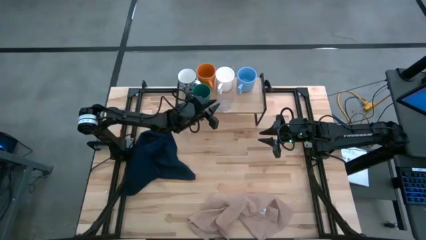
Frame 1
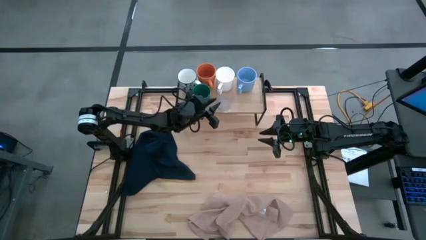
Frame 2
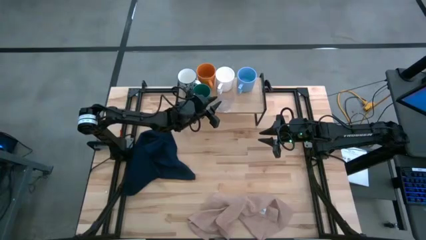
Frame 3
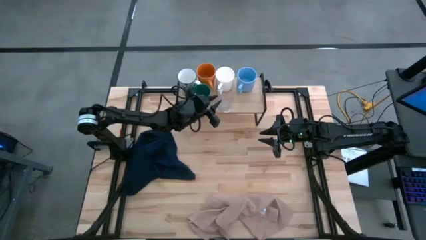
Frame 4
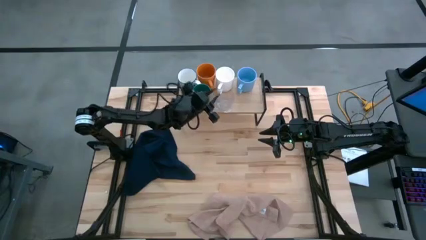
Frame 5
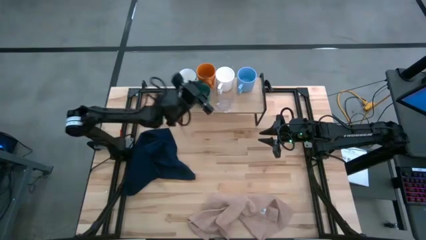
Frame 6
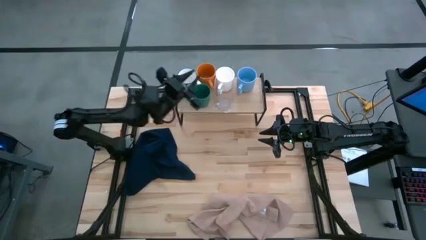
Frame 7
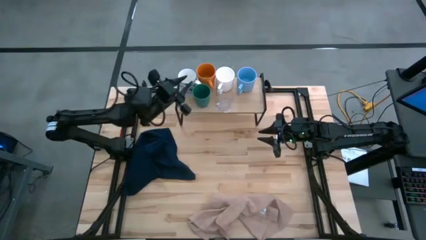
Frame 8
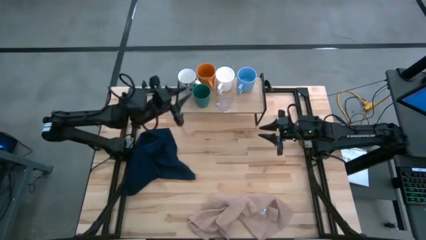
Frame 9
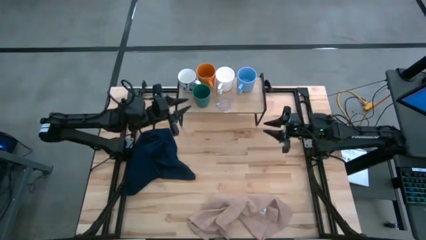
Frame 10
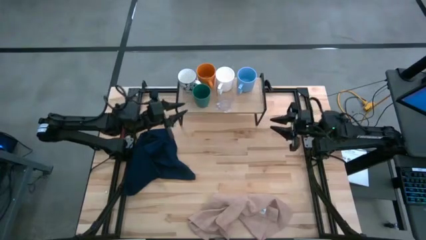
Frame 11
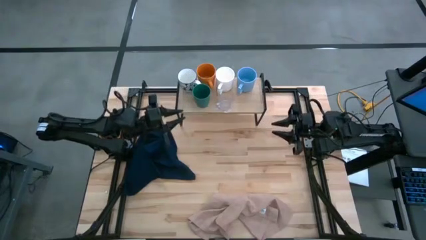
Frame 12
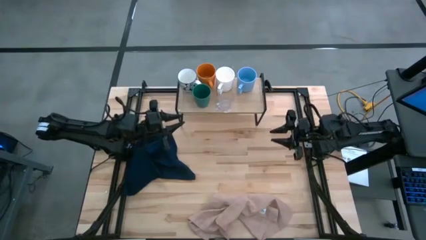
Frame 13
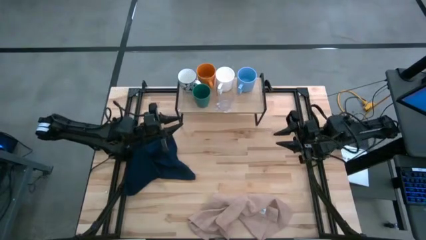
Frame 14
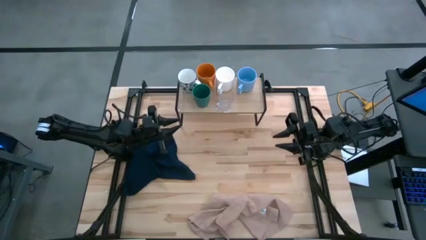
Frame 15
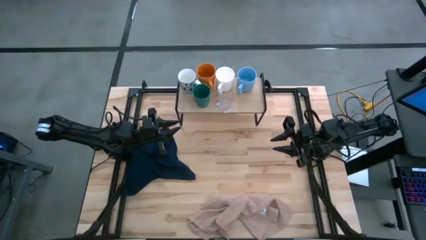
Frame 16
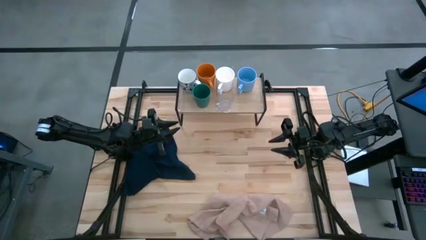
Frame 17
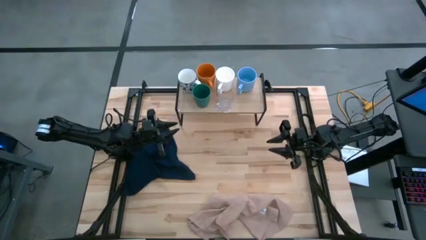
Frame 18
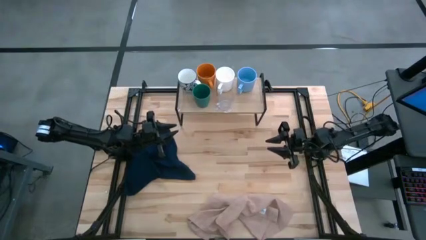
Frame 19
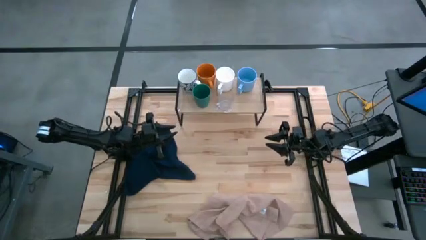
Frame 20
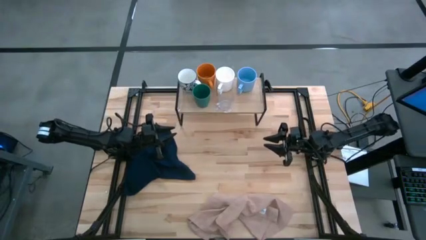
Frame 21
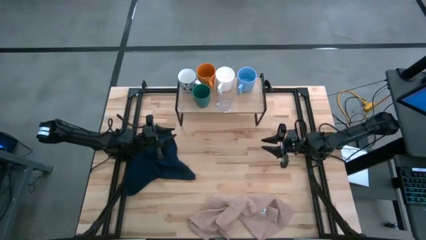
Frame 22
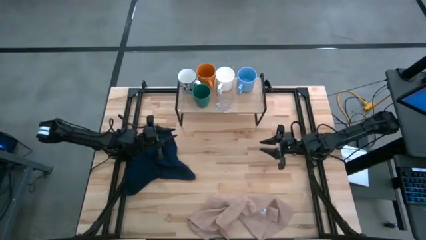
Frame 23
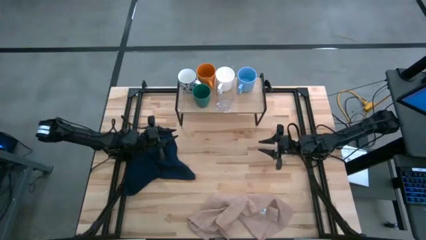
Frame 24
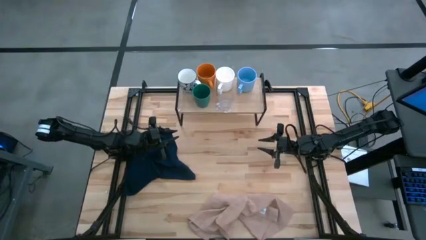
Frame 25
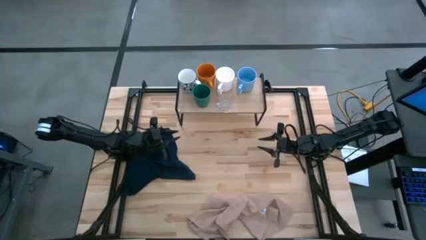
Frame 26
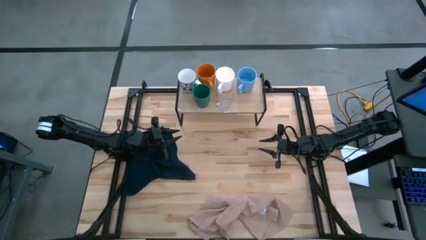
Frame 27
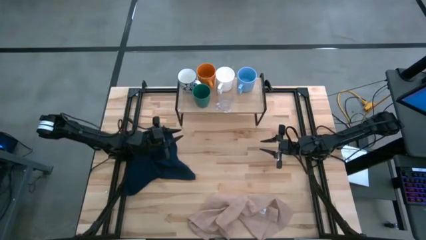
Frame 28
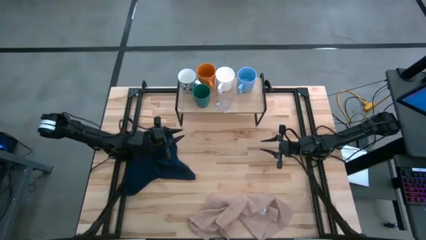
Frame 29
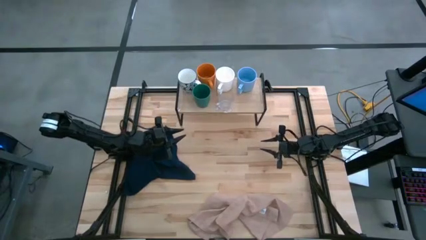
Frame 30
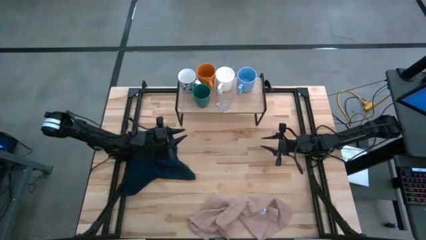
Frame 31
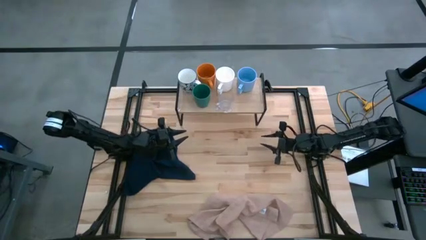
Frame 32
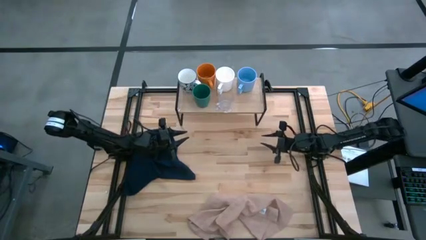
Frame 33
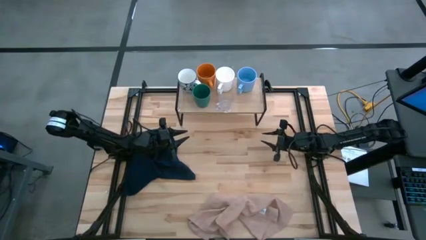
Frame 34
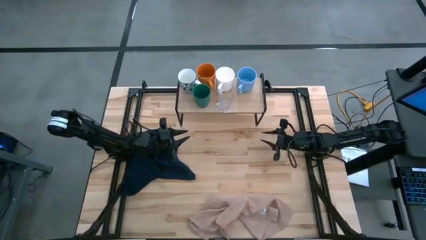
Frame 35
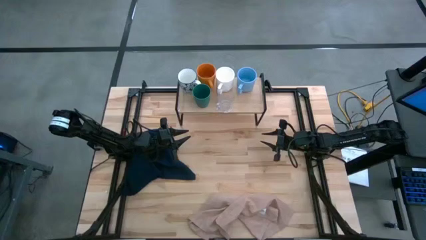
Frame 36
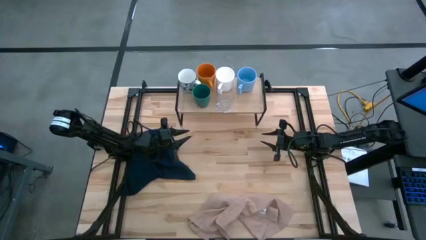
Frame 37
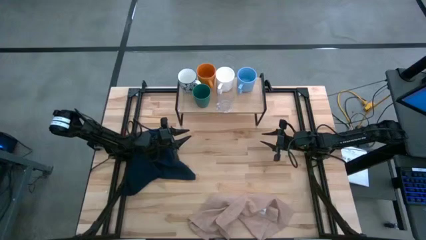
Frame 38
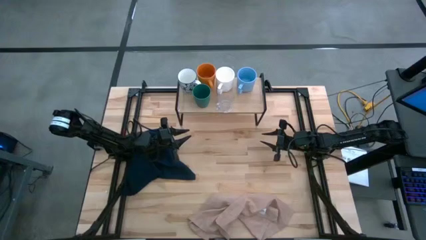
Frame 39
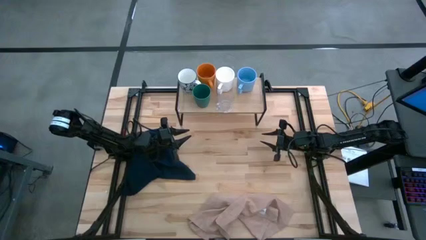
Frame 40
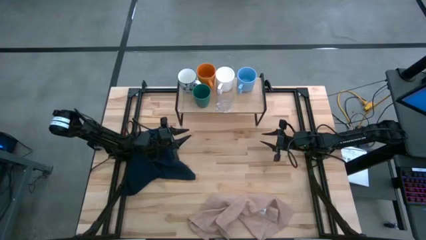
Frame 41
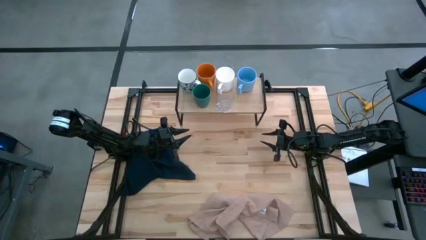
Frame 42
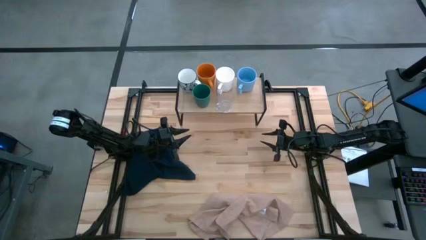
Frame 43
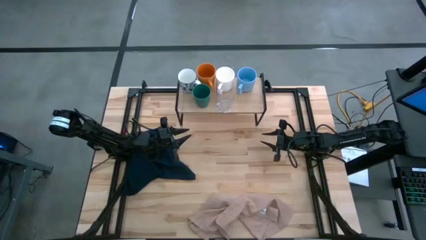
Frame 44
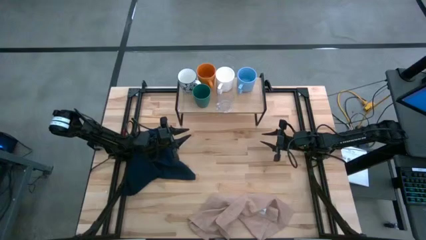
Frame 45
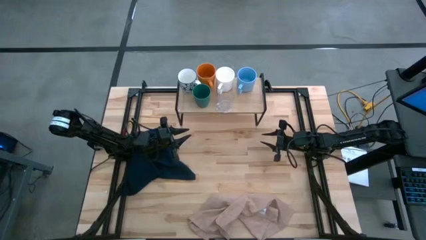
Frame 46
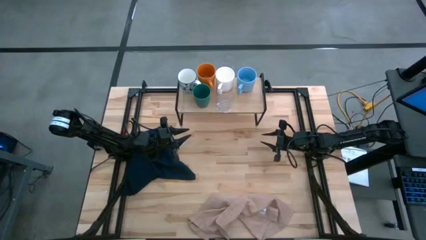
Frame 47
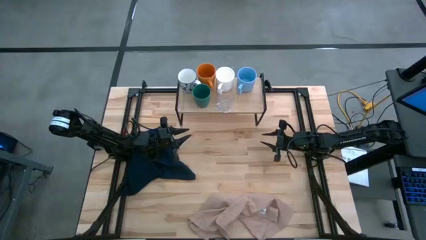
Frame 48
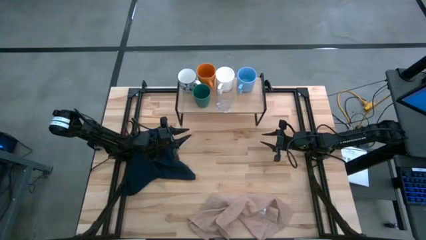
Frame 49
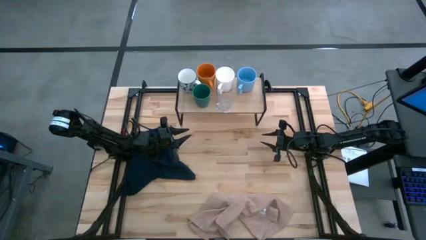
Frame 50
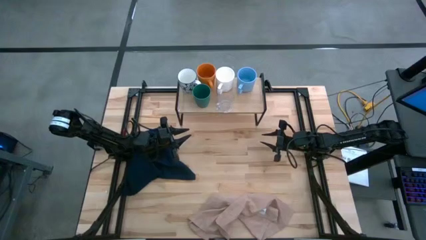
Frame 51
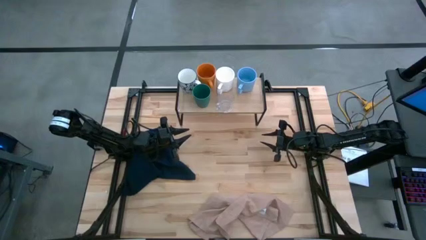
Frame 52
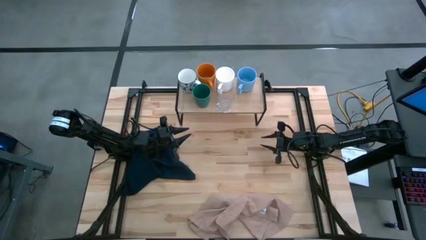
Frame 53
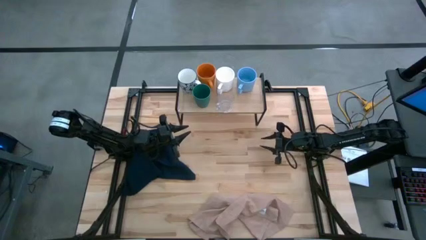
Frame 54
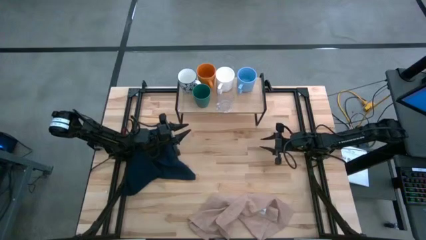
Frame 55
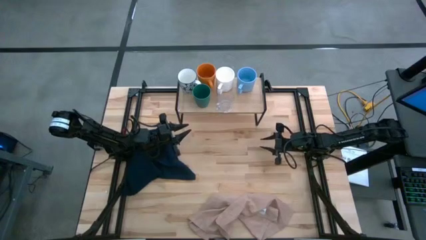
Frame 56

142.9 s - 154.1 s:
Task: Stack small to large cups/mugs on shelf
Return to Home Position

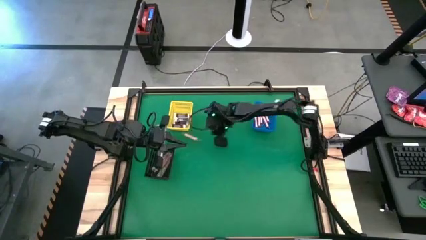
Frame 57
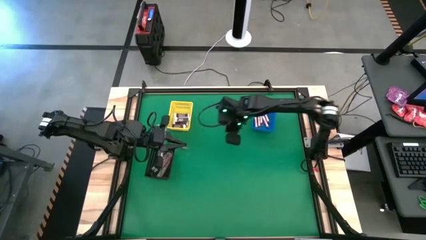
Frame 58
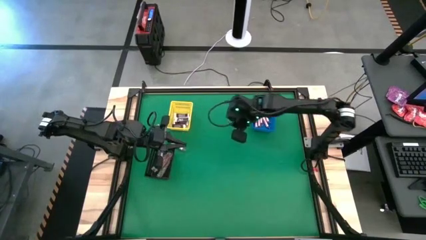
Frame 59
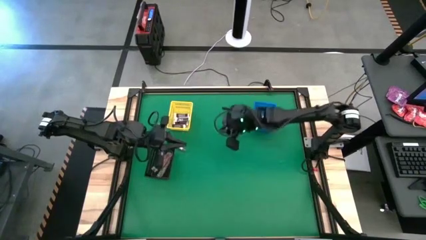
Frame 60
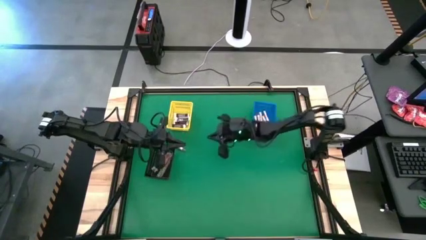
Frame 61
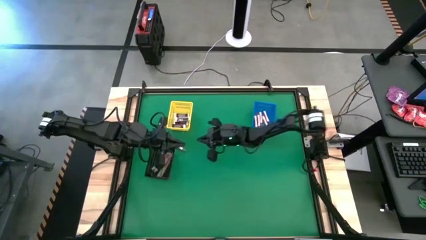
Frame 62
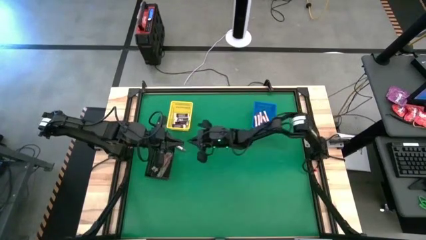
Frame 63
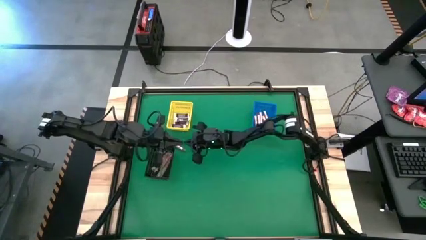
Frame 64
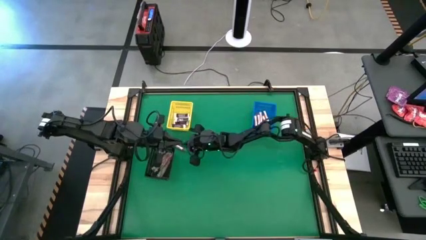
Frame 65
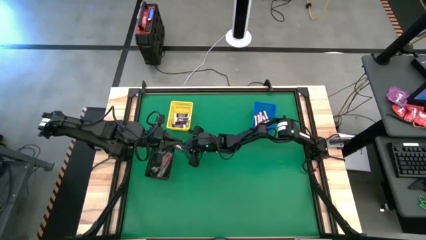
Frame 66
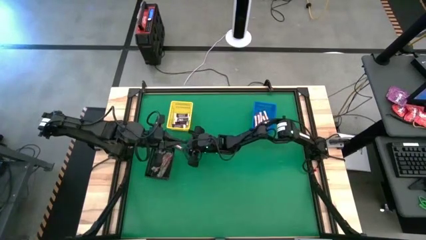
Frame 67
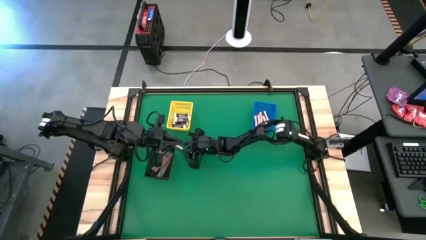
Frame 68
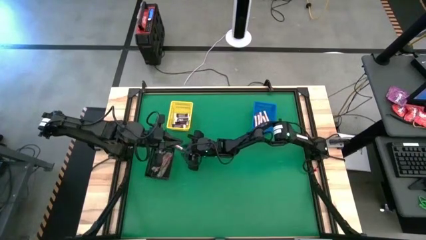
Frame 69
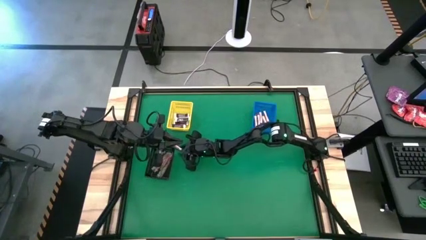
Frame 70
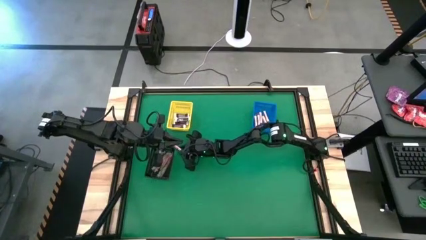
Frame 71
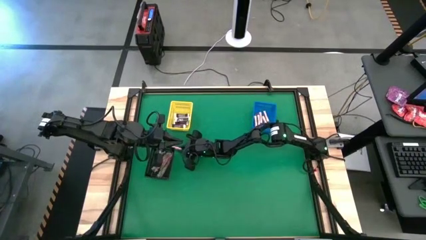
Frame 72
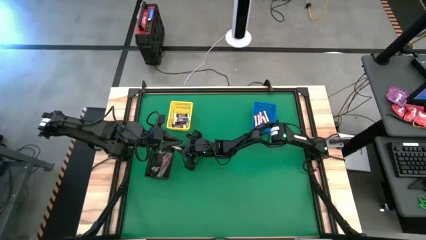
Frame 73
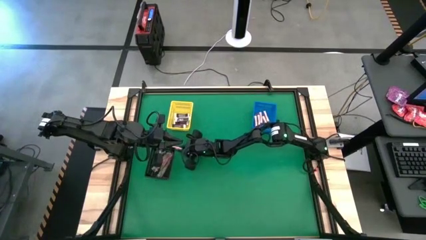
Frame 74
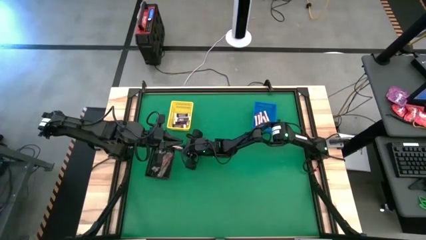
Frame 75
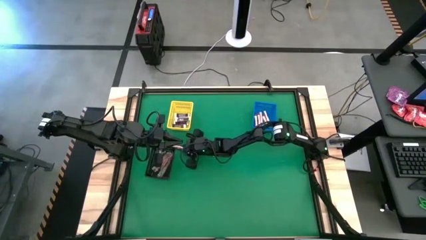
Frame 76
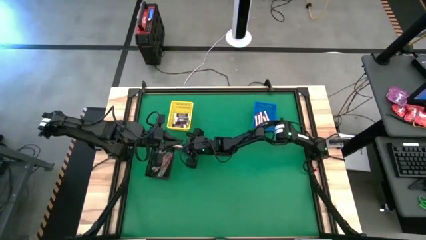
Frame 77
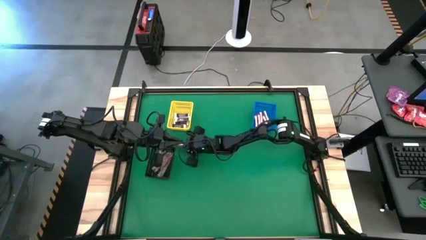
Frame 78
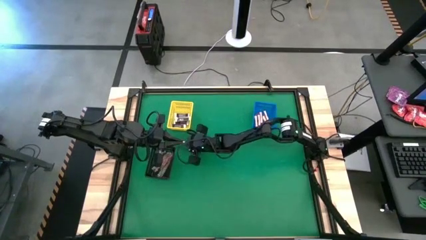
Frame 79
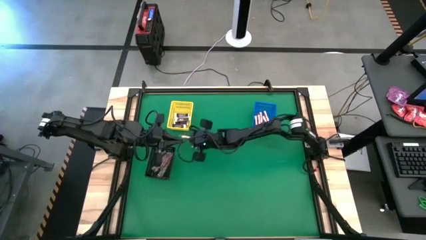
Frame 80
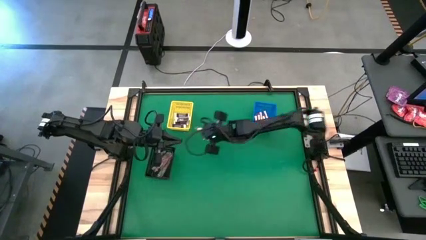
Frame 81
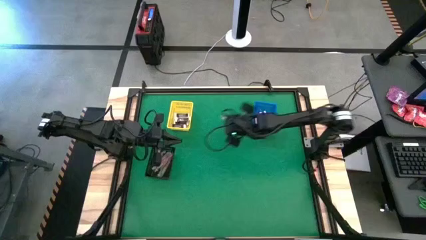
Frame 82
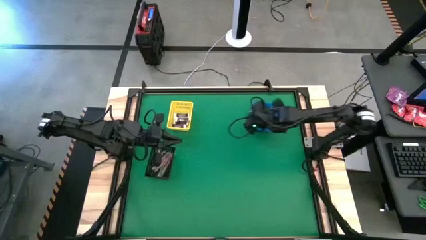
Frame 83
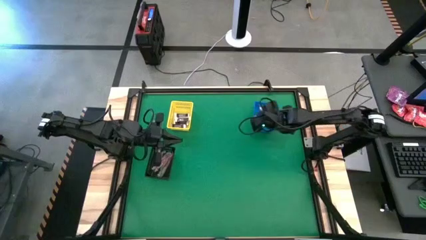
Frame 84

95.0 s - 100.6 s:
Task: Sort candy by brand, put in halloween buckets
Put the white candy stick into the blue bin
